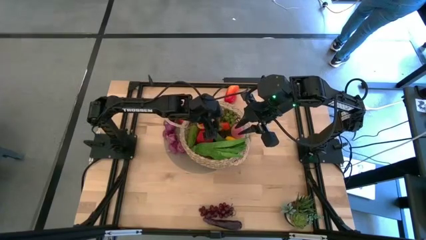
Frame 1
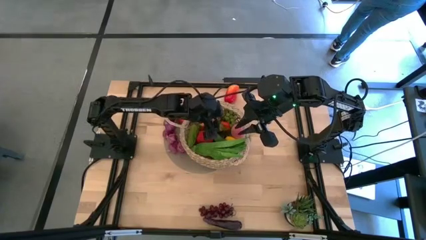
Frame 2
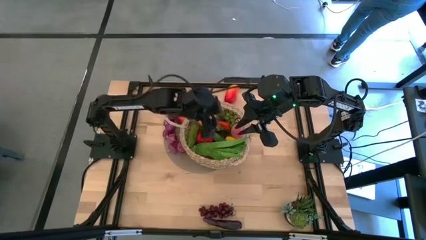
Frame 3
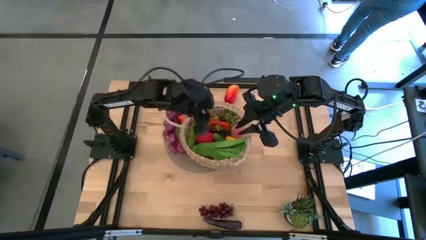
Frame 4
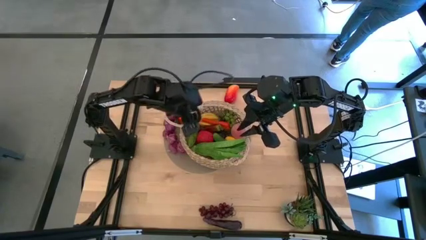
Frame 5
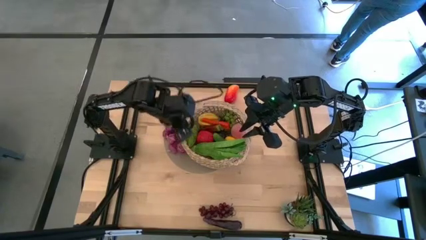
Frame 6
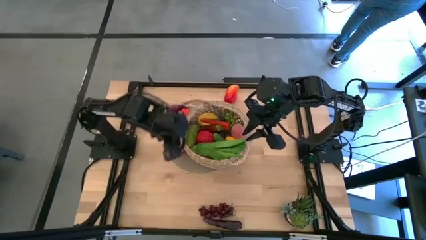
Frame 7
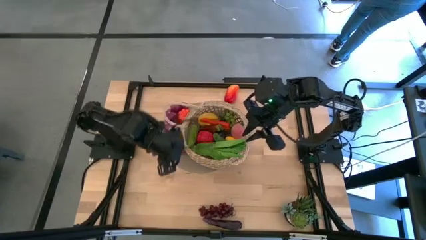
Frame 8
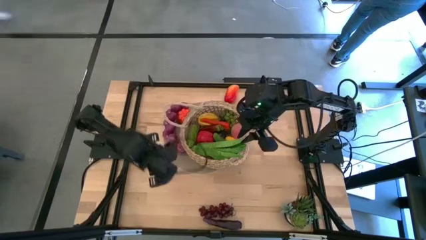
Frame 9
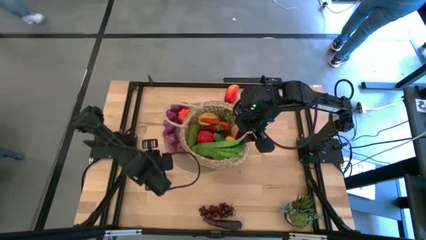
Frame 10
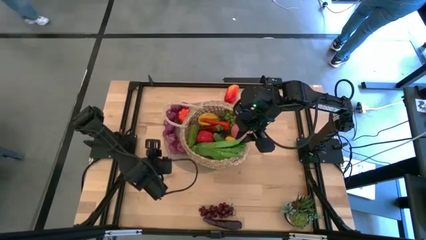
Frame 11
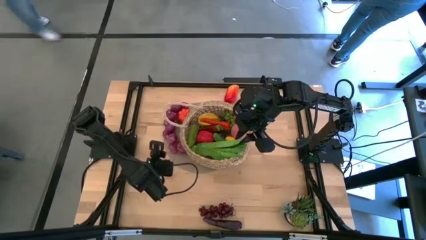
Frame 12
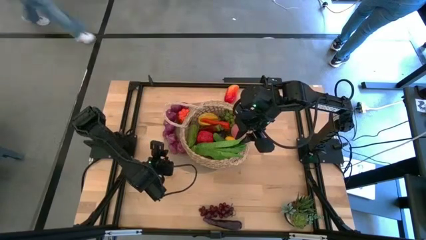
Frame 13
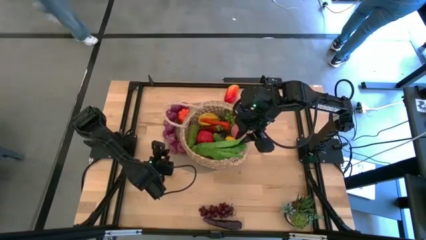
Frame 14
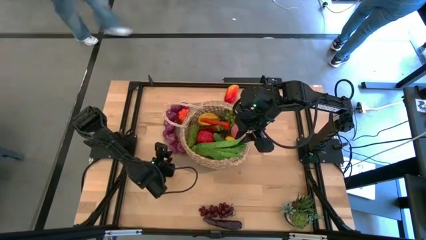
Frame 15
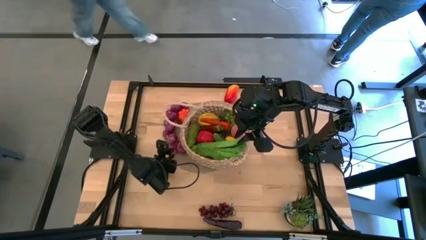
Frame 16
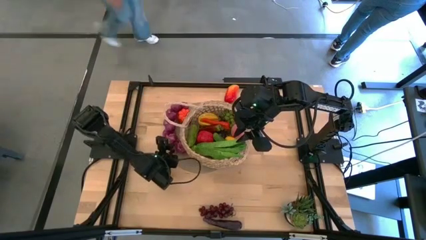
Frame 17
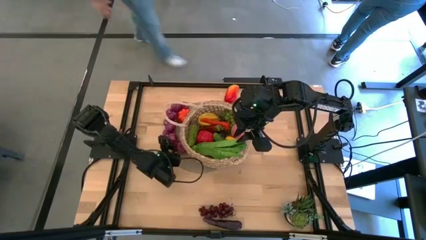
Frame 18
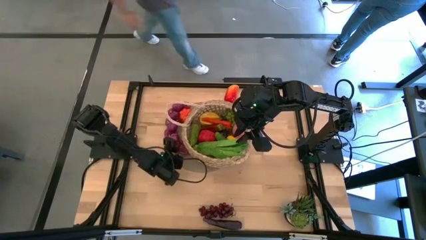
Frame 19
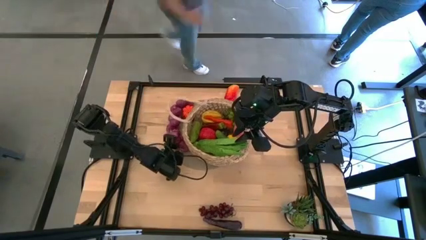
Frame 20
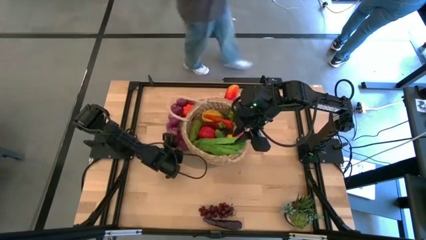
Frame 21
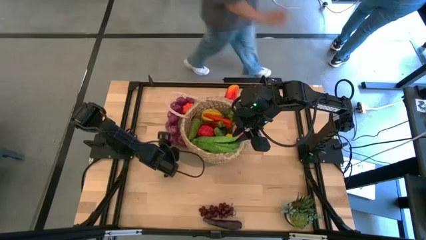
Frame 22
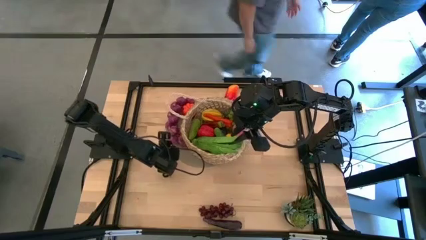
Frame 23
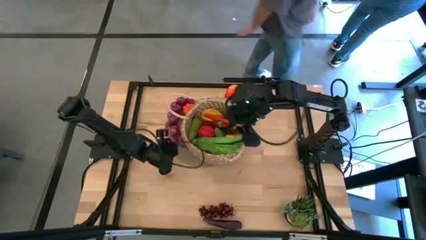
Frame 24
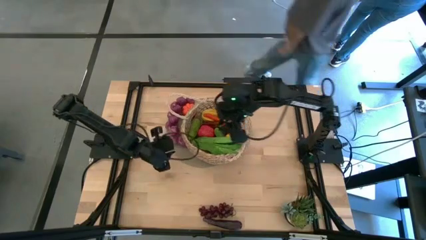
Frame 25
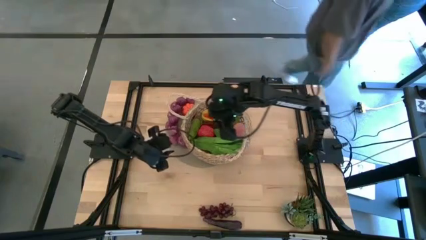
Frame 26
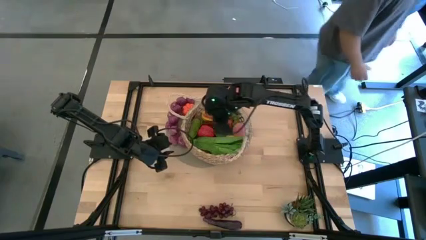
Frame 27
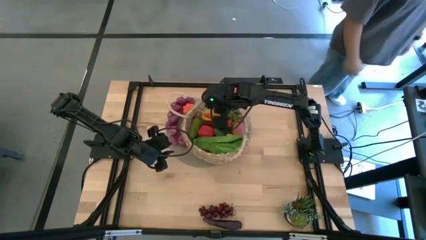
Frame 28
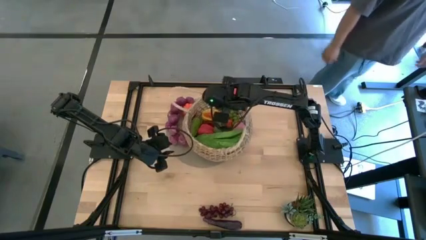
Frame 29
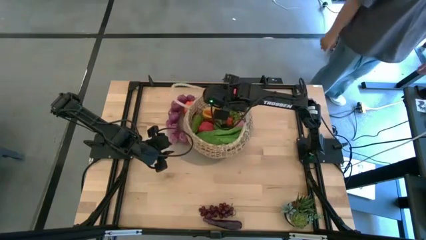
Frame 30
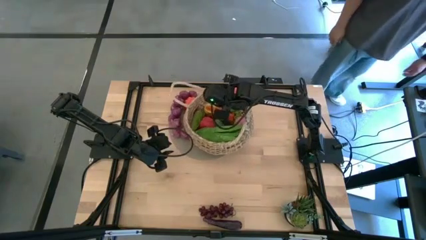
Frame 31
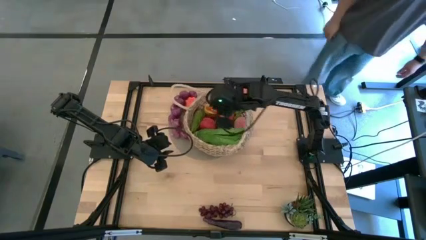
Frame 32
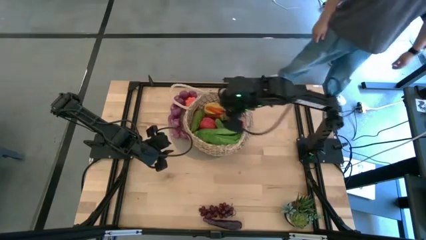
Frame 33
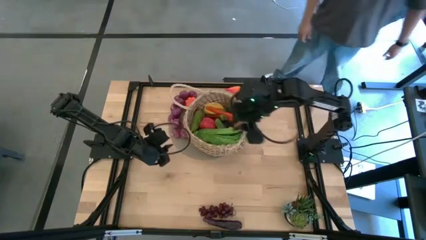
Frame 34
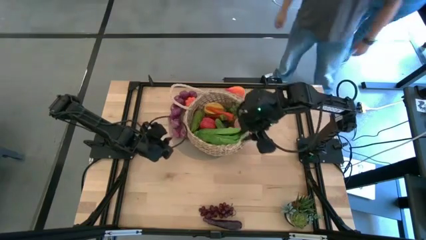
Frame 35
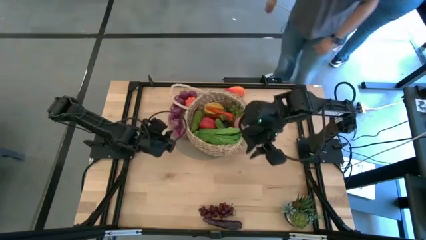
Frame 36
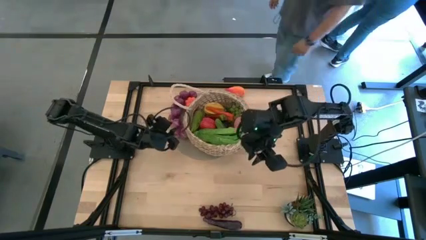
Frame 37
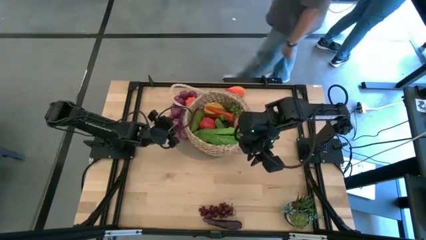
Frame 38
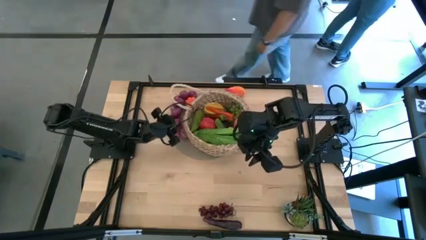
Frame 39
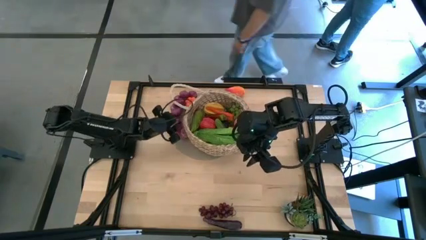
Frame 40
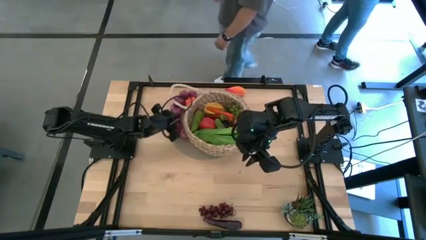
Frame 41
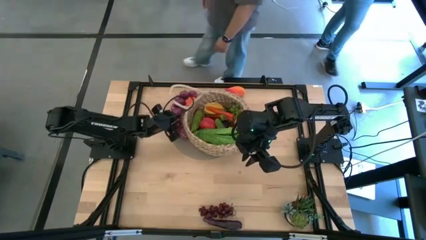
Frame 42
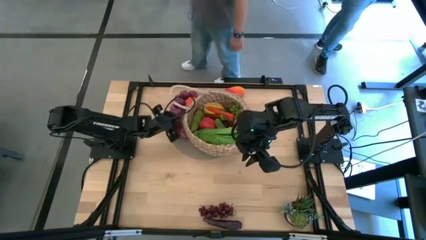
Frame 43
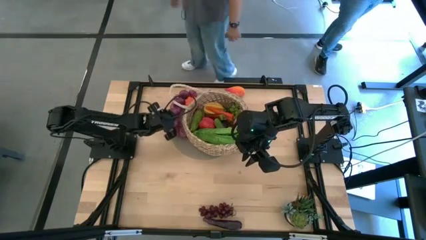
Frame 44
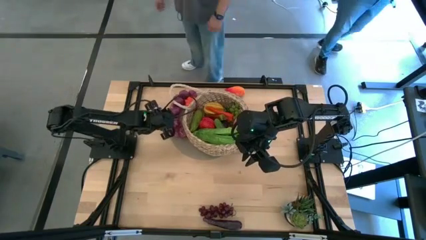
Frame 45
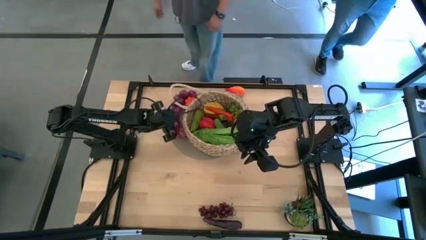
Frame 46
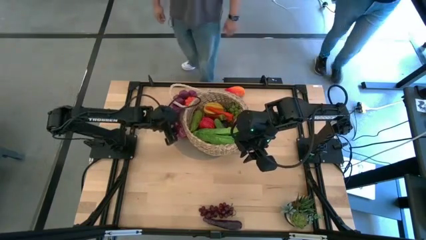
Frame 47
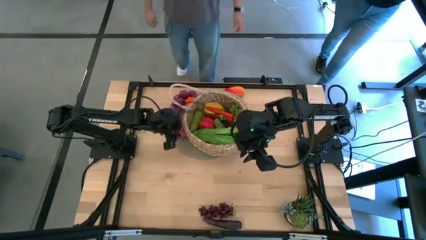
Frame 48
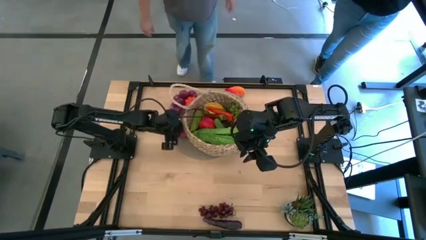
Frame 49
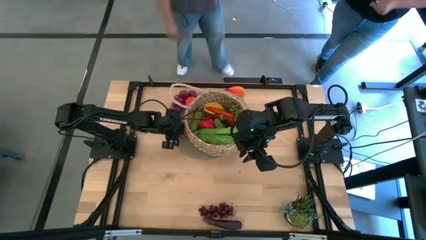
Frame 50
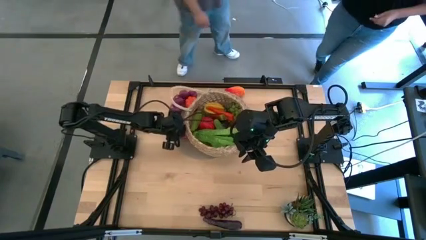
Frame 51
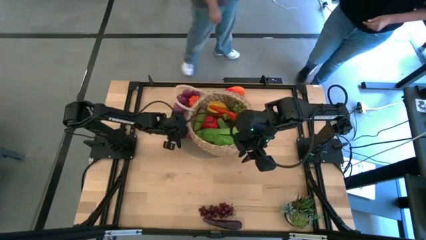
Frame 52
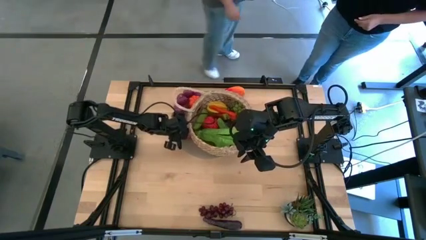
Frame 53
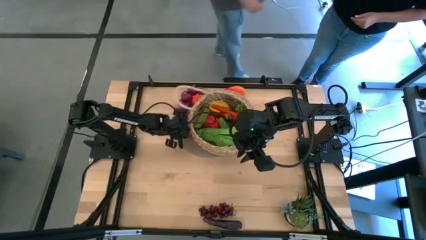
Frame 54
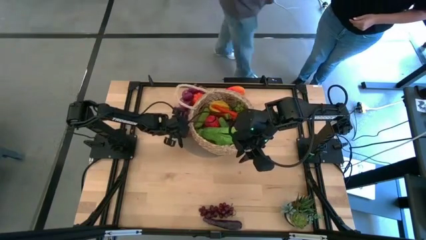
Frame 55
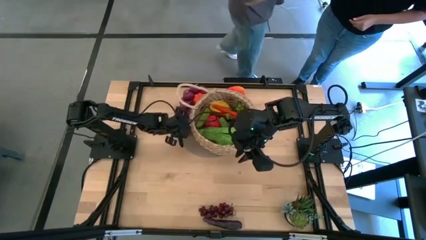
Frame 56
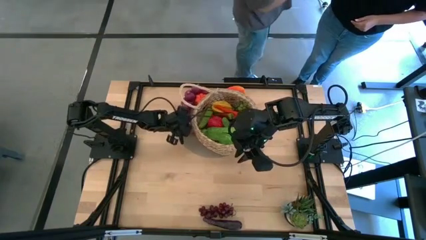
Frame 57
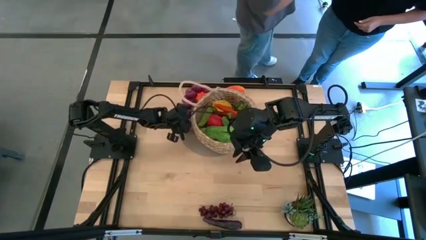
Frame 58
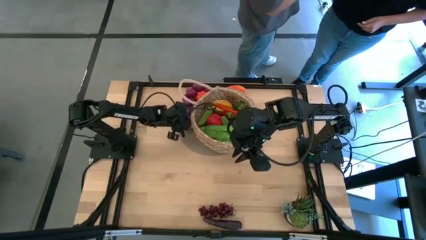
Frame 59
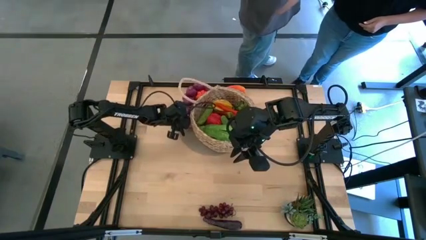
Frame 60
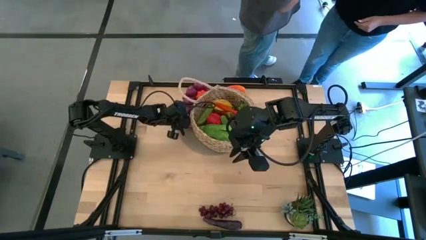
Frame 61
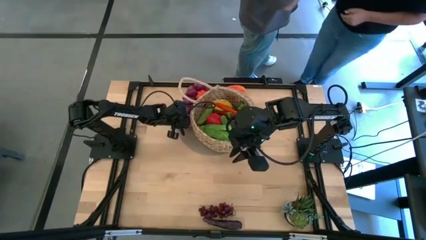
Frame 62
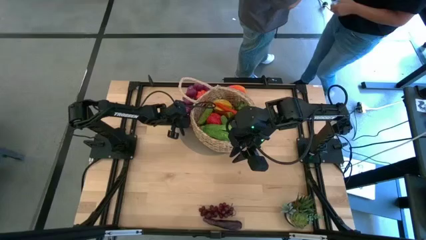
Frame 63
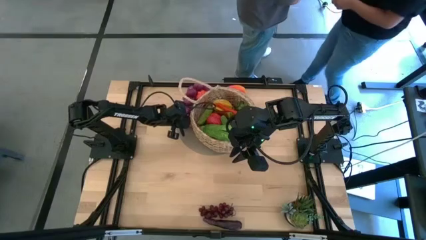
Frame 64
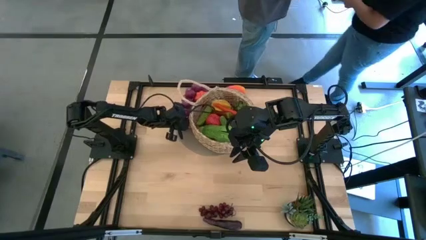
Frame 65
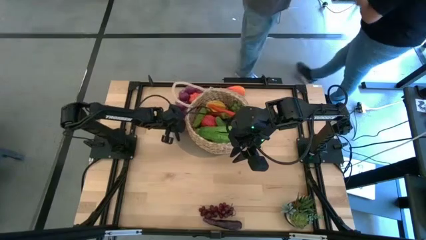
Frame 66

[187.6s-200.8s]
Task: Build produce basket
Put the purple garlic into the brown basket
